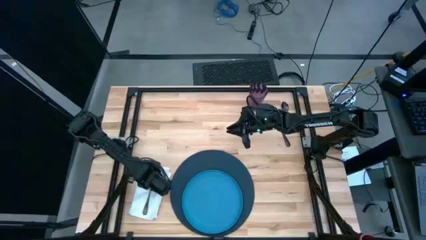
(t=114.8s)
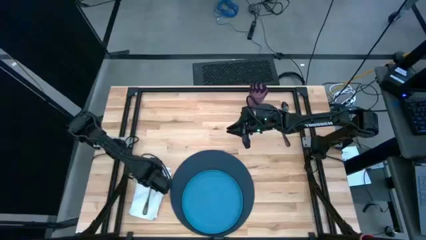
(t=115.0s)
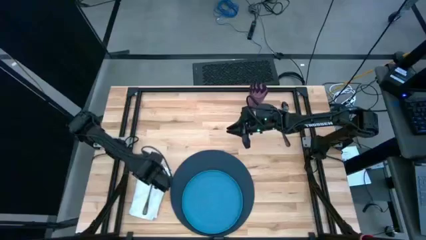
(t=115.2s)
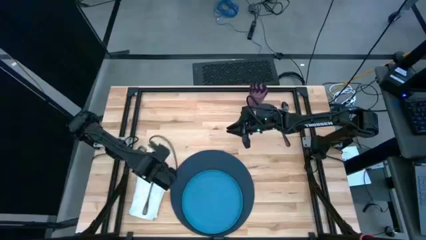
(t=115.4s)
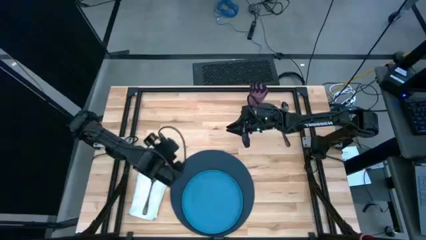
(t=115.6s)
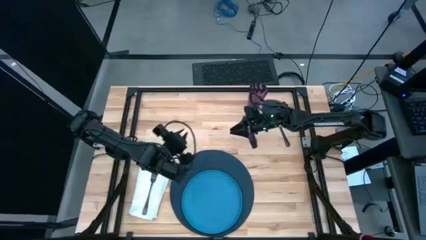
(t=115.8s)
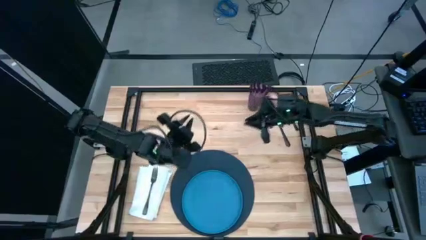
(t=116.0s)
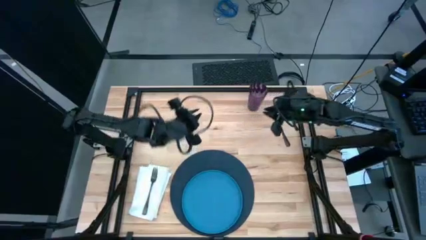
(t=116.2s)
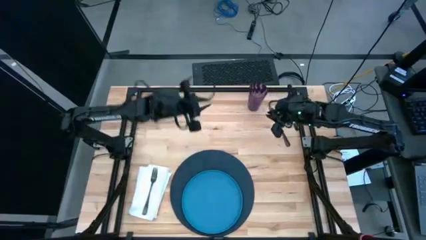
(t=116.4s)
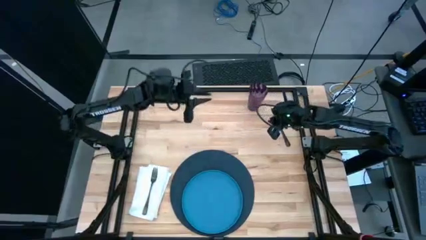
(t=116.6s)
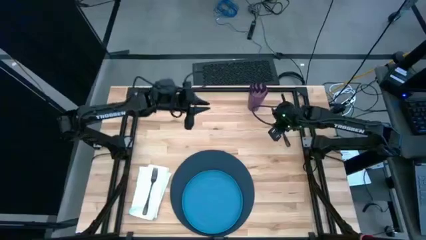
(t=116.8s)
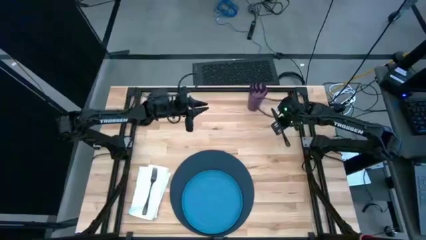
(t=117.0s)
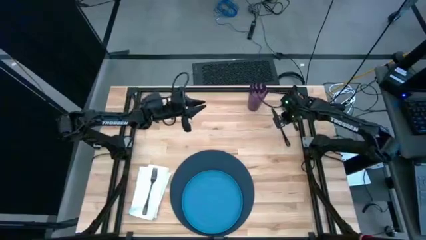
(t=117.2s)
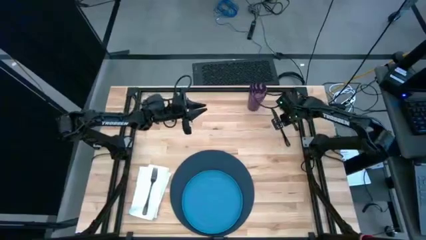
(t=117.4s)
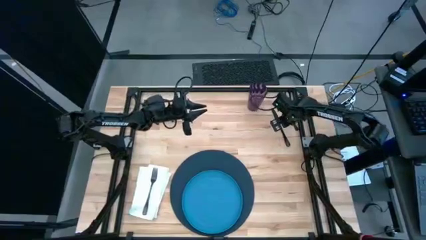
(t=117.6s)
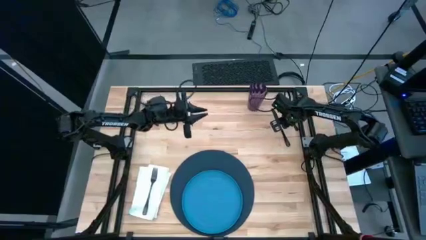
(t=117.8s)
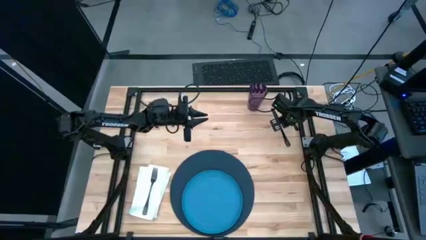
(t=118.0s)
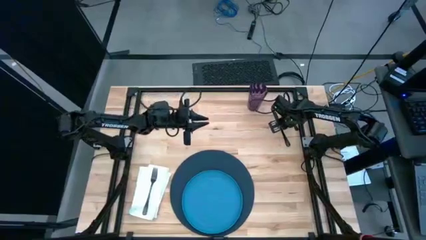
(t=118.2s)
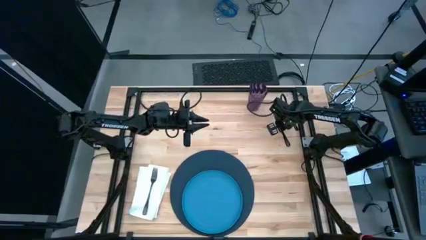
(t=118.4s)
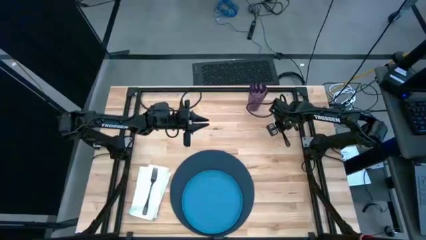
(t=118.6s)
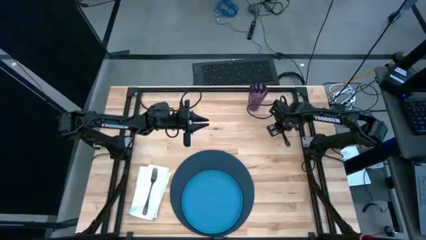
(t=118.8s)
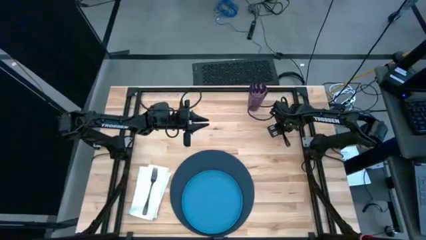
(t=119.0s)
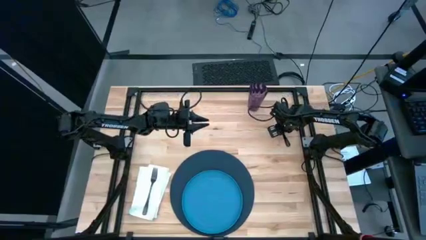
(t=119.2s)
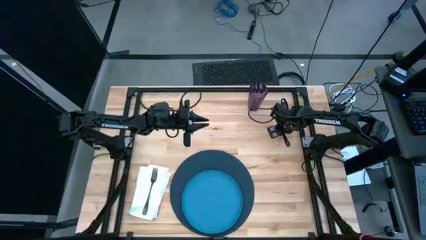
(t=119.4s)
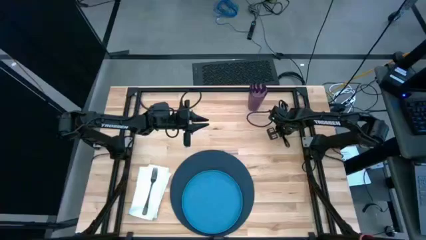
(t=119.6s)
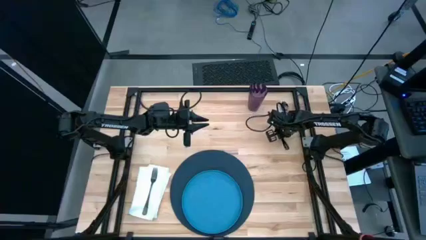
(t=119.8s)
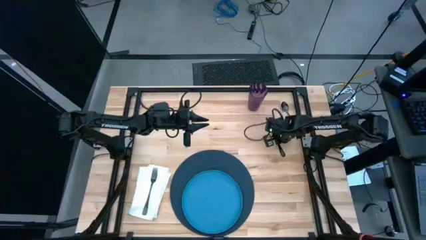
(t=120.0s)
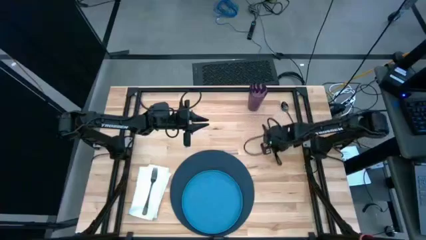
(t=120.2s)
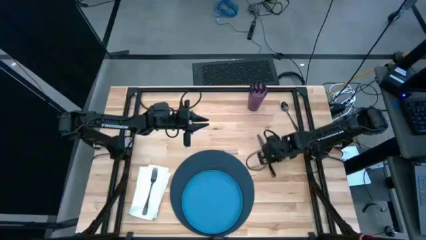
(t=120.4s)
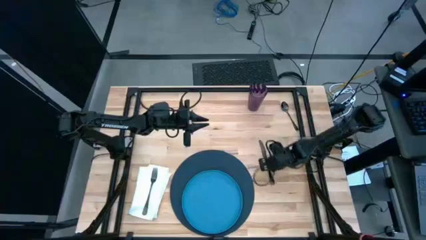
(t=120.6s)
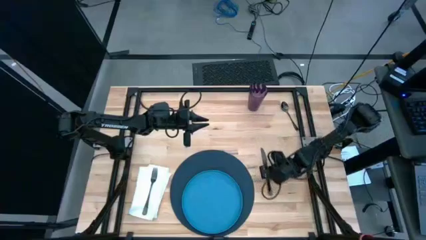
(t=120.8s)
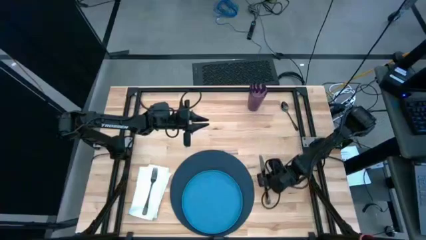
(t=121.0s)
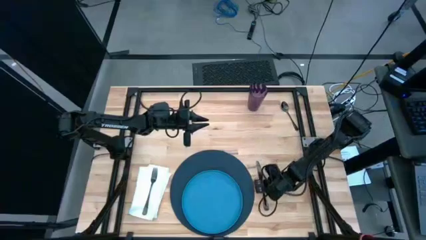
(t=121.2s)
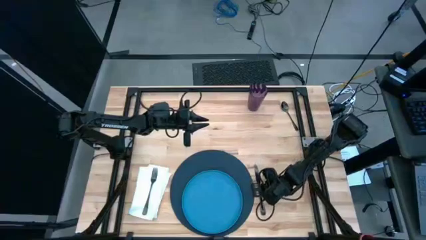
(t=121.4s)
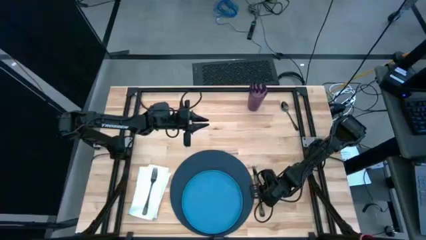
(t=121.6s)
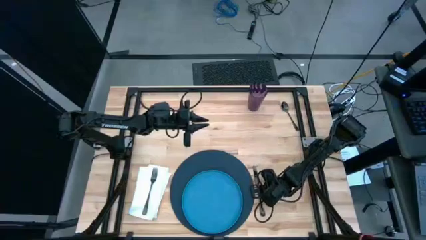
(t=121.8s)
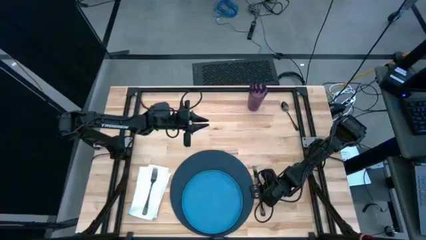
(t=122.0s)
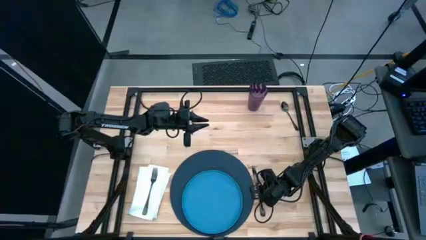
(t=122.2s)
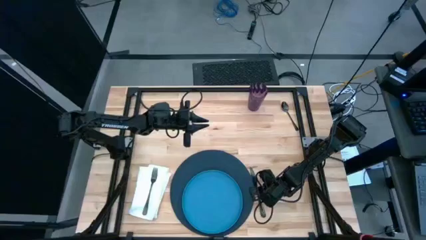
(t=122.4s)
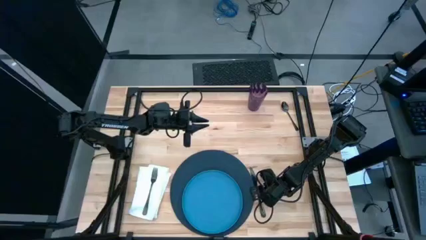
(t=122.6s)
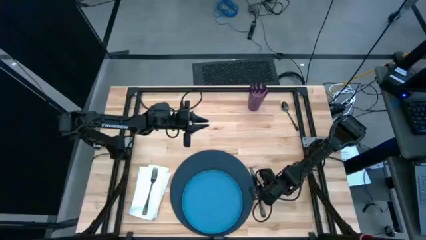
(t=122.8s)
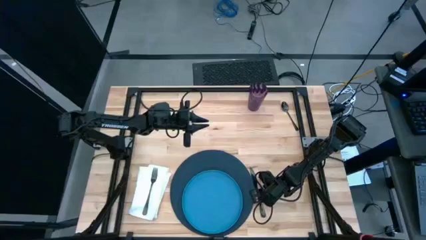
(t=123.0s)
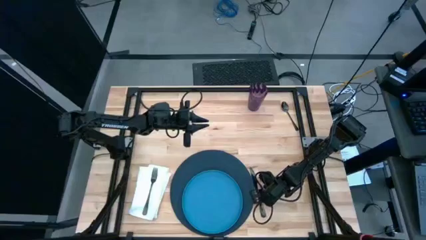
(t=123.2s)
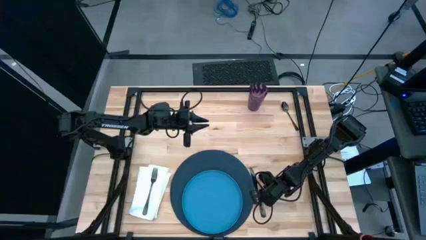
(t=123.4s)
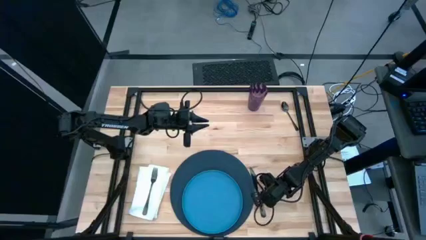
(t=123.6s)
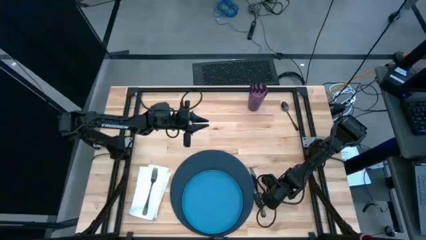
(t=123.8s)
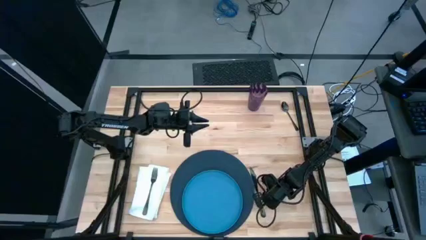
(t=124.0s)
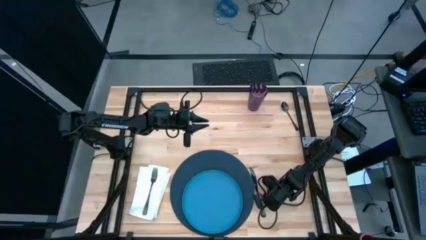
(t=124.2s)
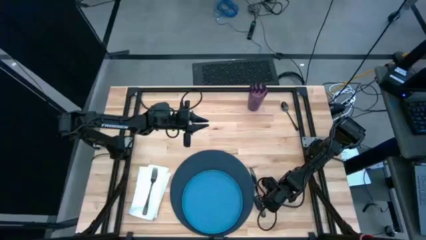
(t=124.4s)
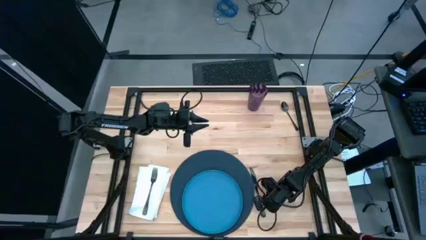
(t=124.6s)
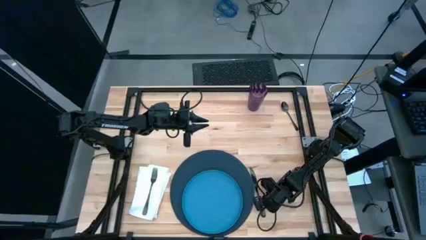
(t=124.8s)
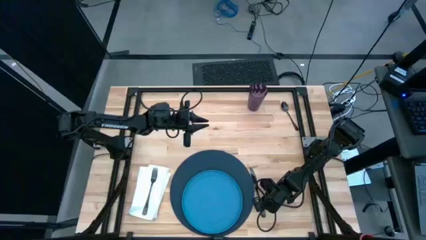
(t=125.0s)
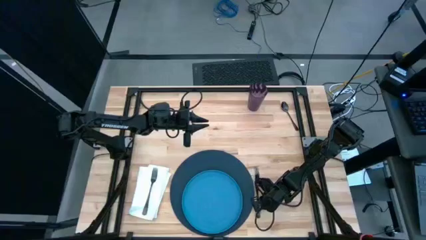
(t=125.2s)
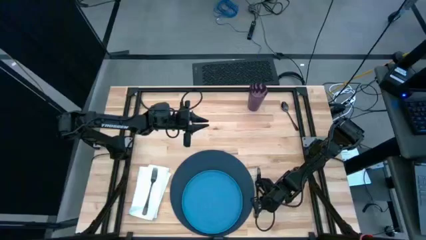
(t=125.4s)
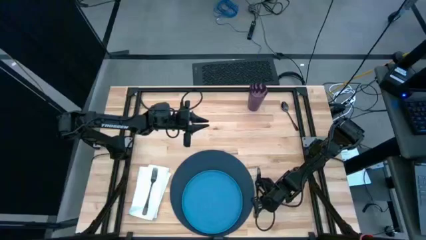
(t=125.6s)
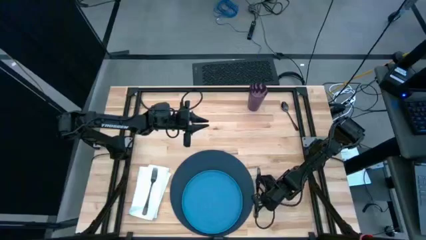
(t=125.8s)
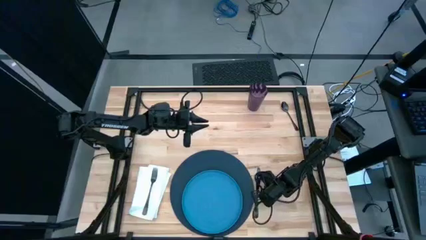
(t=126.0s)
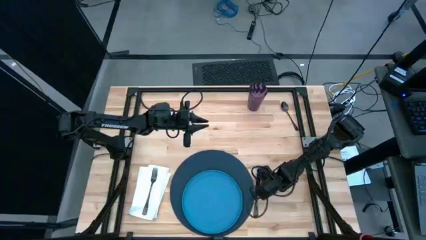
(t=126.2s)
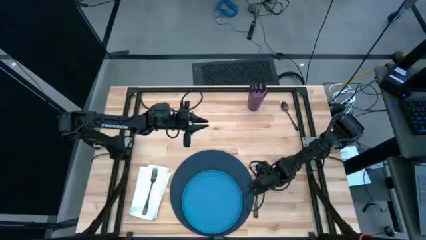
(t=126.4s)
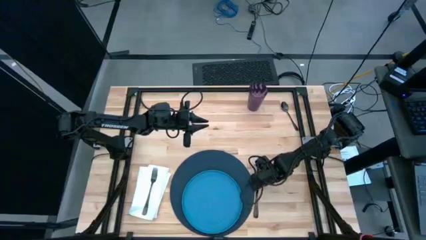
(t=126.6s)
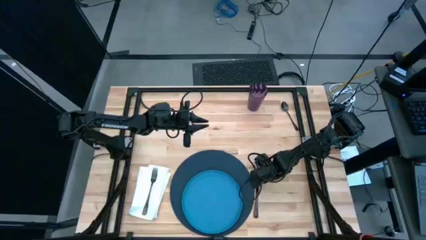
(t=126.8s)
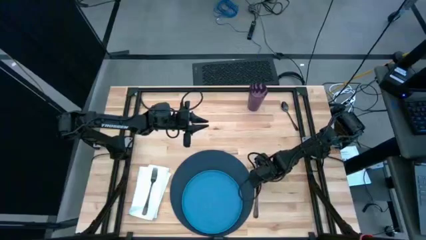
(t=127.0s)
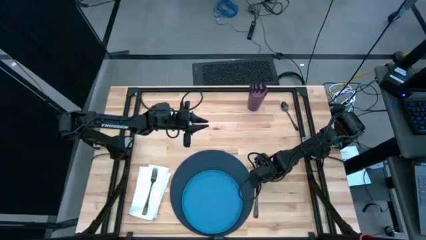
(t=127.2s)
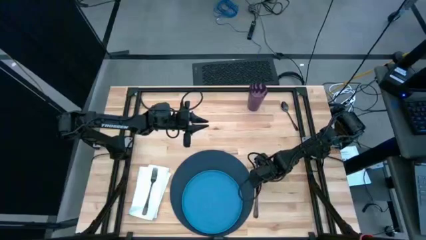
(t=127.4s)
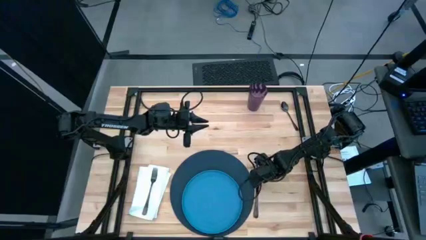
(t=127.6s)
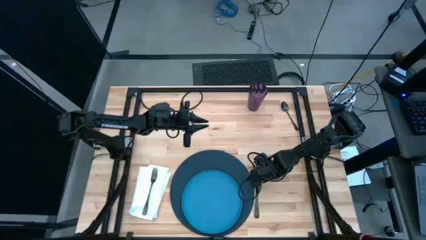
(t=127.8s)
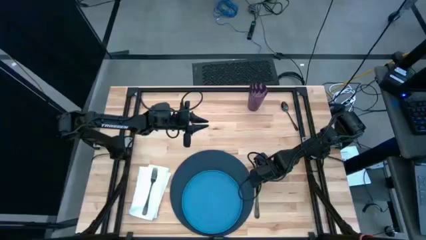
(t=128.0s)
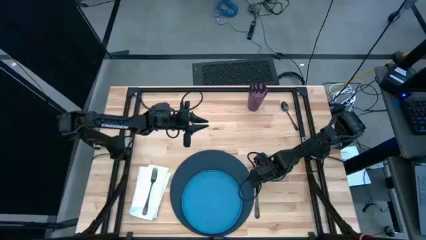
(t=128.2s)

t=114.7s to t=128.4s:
Task: Set table place
Move the table knife beside the placemat
